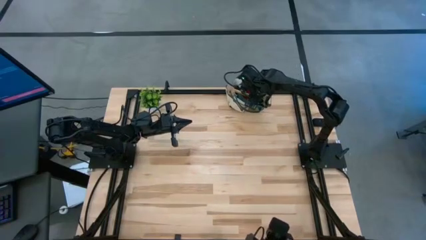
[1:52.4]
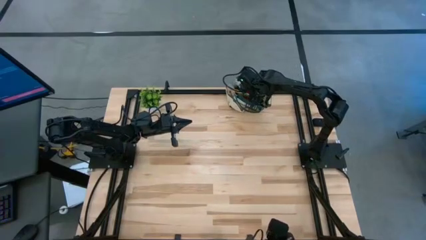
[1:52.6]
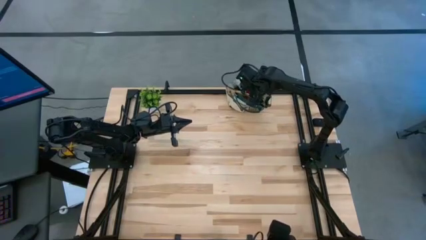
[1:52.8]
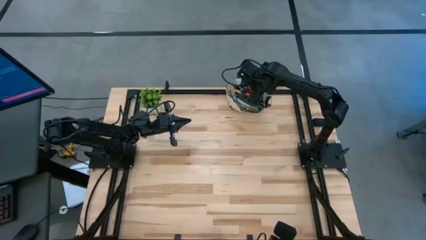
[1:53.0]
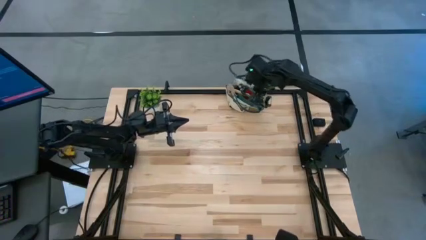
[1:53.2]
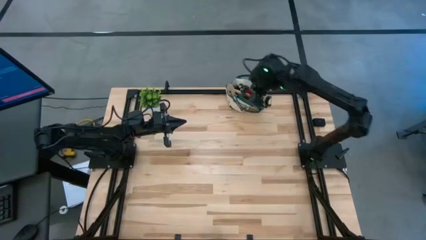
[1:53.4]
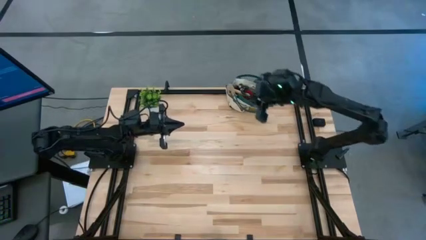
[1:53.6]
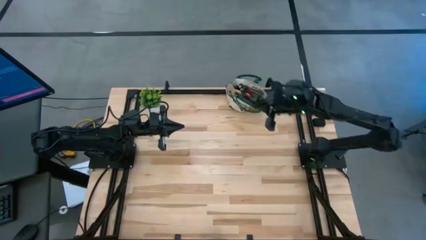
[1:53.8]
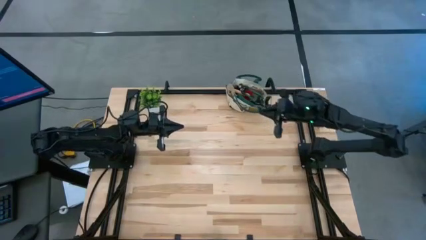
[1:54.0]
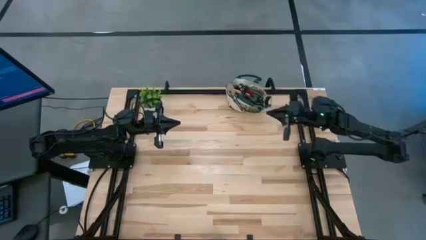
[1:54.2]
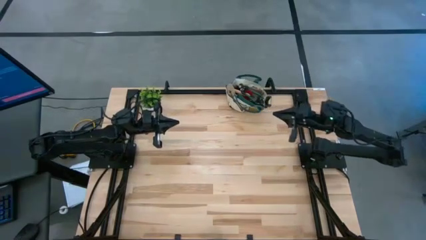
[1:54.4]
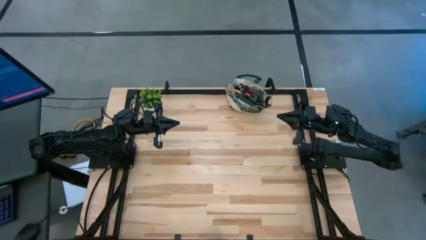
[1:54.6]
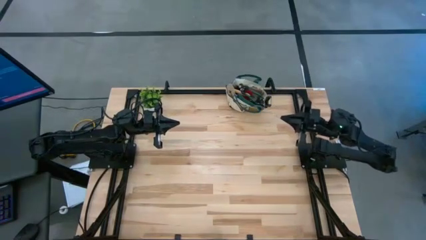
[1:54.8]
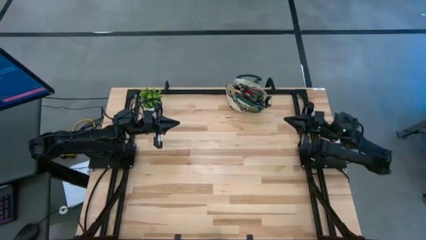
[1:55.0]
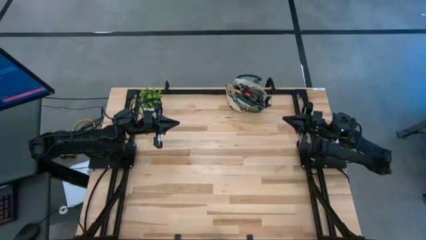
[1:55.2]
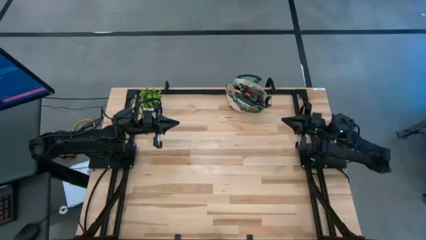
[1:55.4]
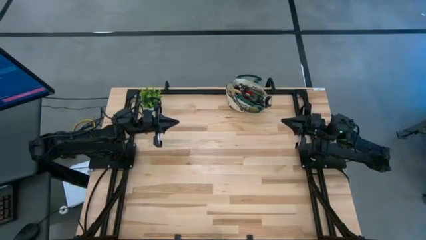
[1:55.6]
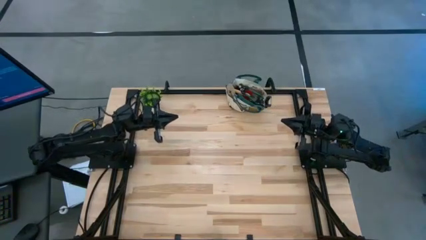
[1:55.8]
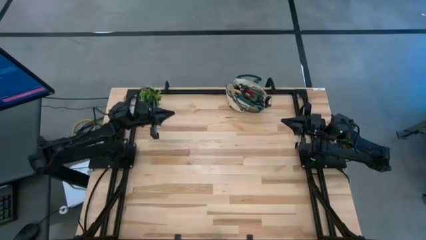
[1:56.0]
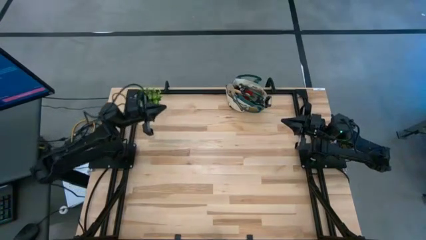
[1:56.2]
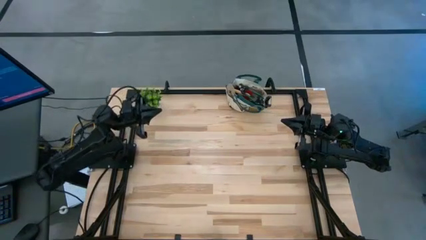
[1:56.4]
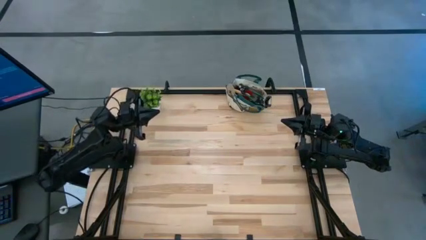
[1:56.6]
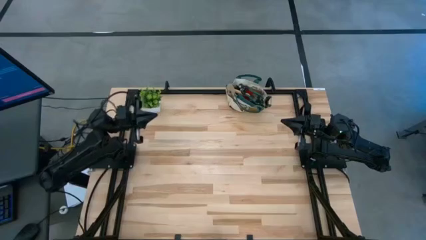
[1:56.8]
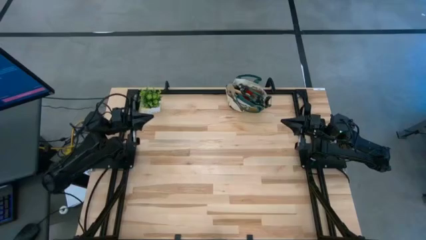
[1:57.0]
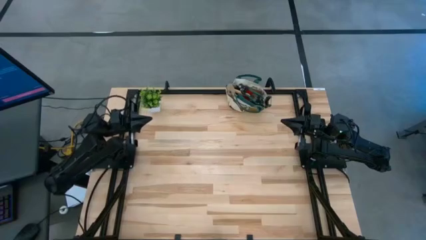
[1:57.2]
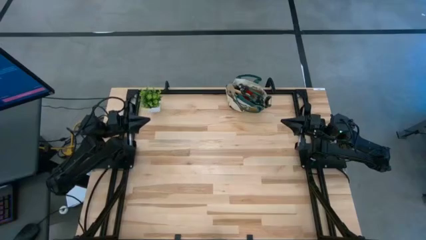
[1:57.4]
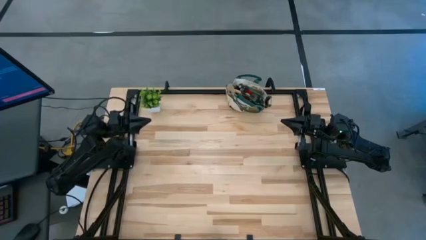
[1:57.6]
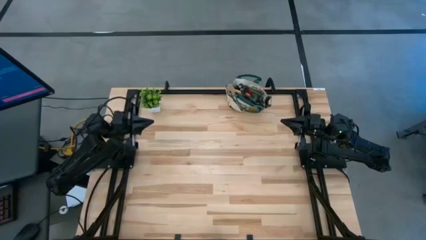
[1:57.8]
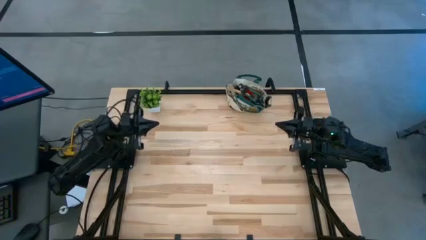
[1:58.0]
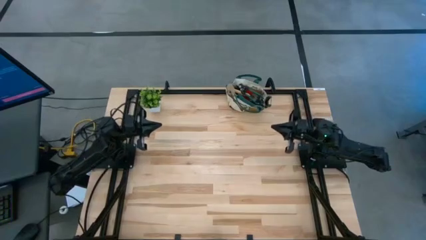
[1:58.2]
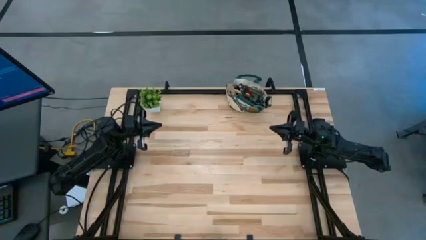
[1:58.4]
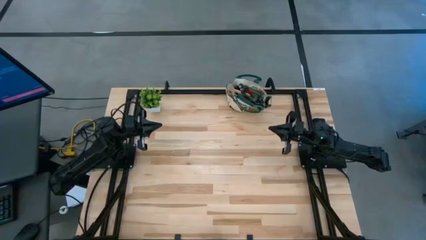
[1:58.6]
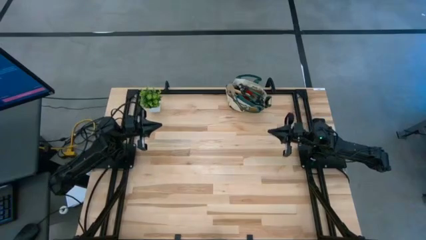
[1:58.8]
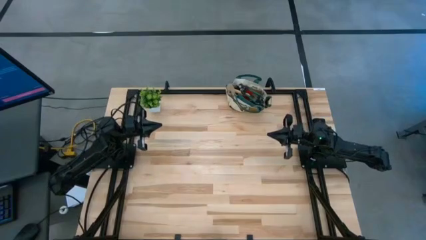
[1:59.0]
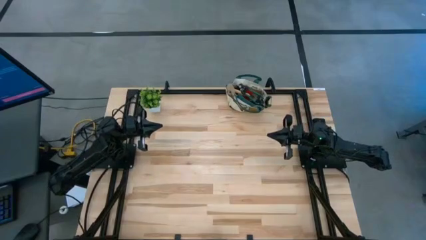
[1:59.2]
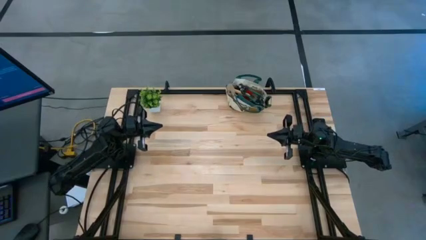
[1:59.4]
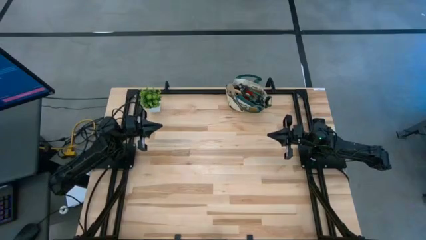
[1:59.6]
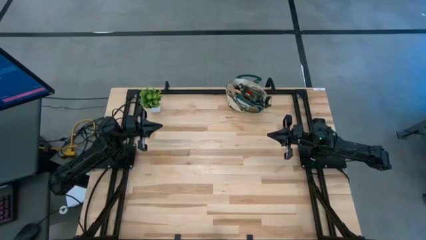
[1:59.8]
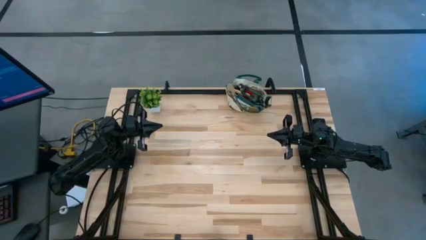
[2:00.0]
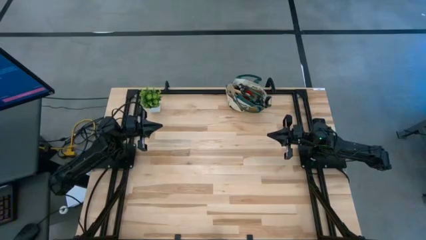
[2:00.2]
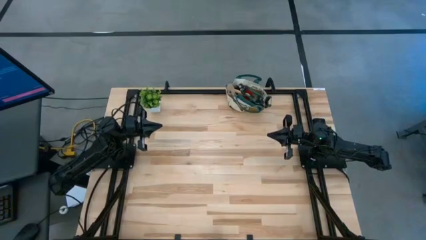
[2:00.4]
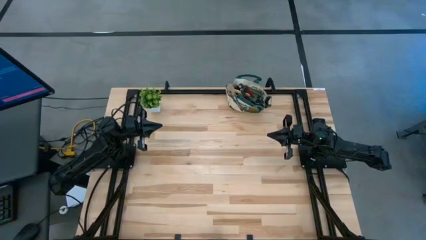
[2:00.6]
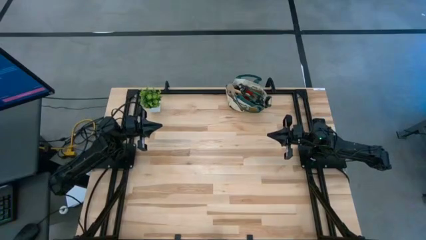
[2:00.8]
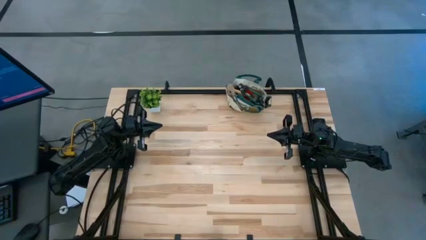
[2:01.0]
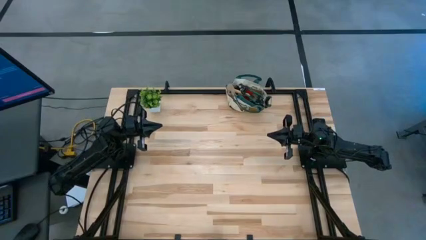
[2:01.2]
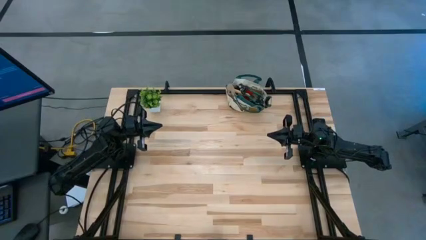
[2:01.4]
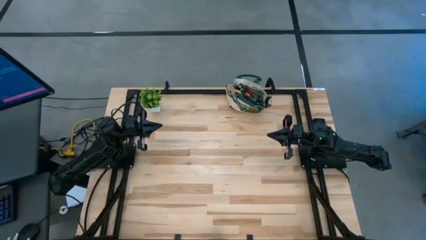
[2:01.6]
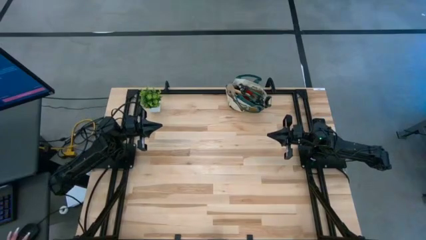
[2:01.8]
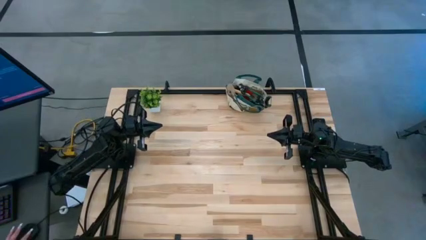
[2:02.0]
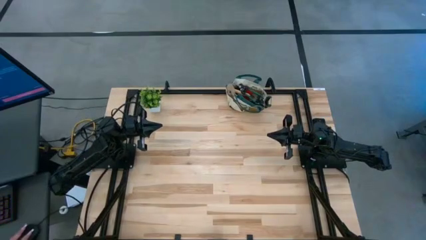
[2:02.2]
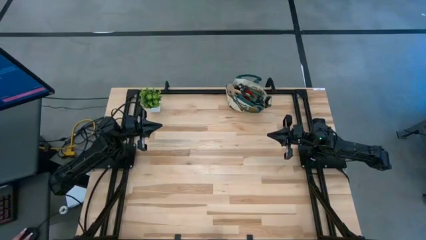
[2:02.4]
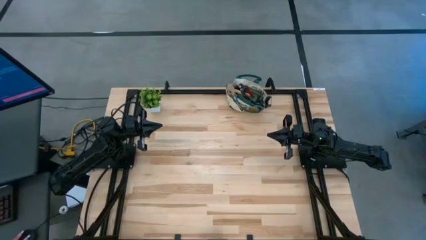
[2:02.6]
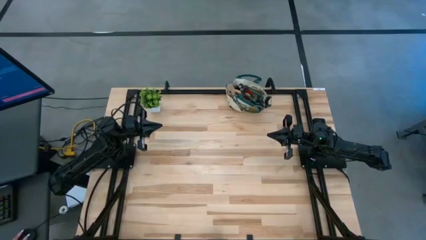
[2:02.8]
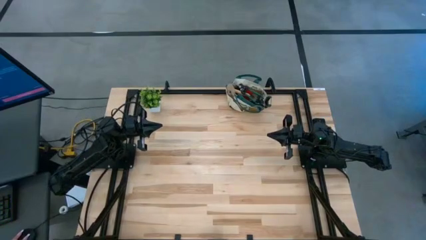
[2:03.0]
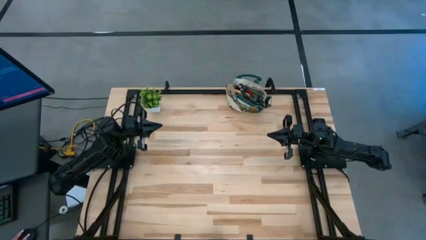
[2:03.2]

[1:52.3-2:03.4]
Task: Pick & Place Garden tools in Gardening bag
Return to Home Position

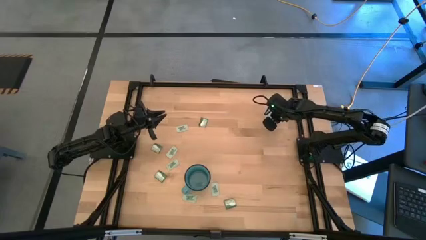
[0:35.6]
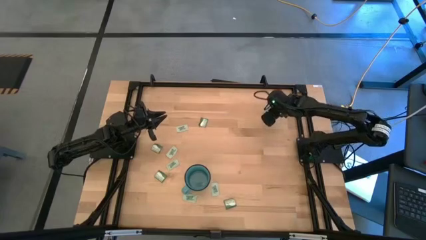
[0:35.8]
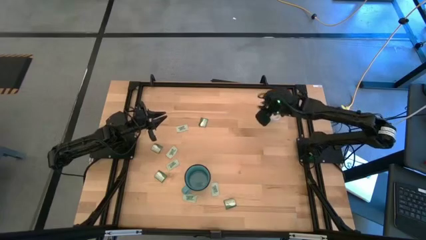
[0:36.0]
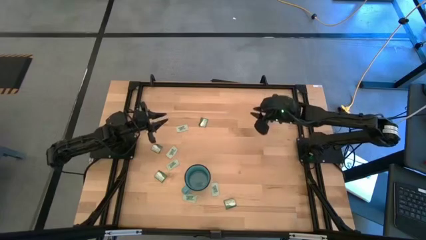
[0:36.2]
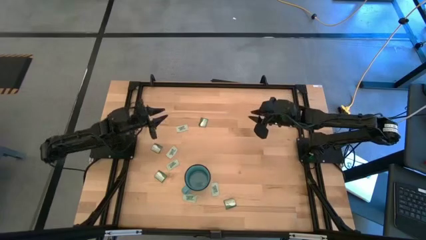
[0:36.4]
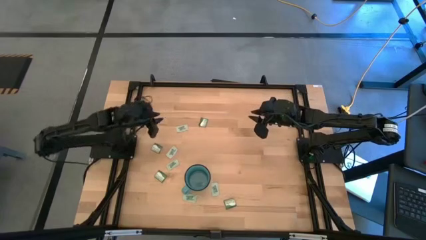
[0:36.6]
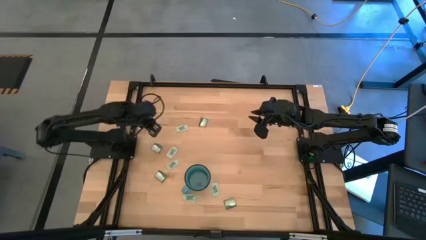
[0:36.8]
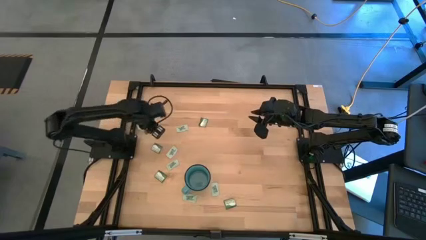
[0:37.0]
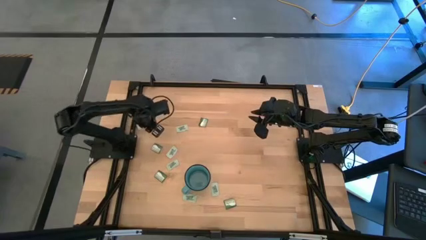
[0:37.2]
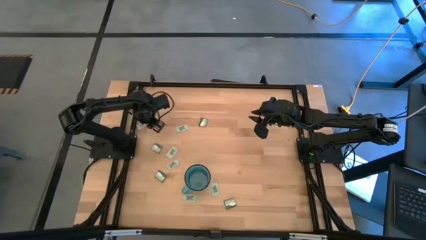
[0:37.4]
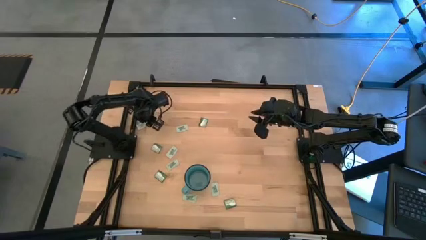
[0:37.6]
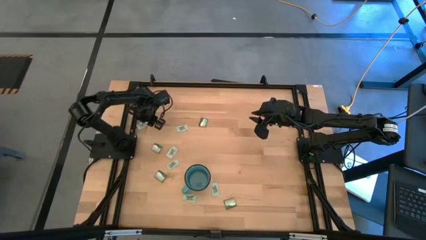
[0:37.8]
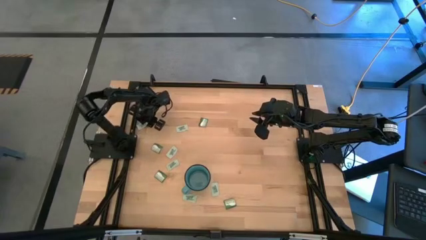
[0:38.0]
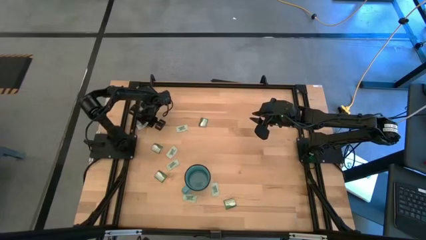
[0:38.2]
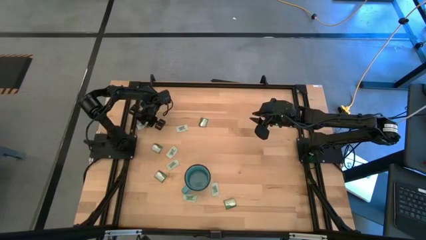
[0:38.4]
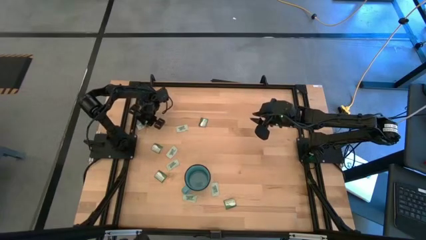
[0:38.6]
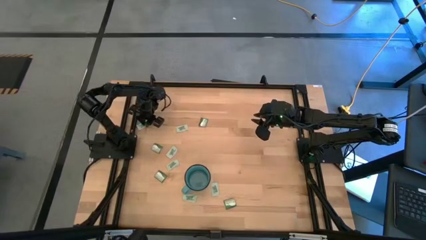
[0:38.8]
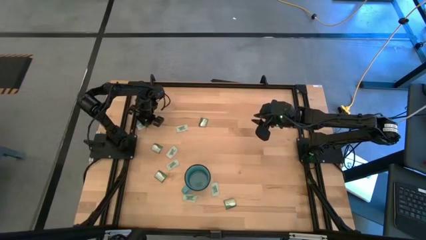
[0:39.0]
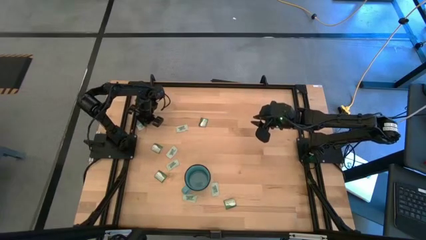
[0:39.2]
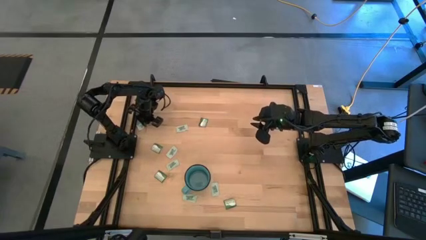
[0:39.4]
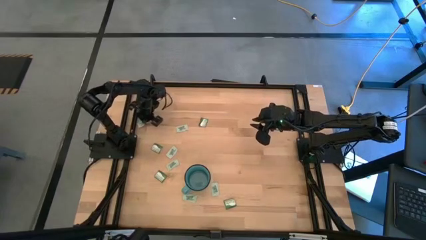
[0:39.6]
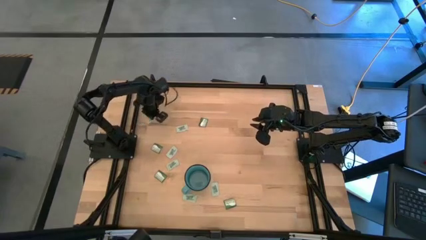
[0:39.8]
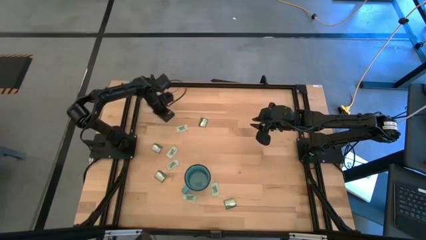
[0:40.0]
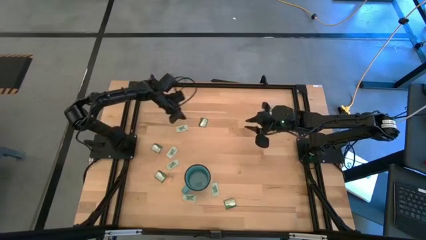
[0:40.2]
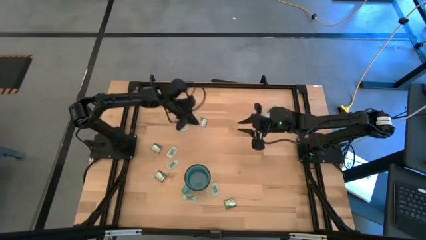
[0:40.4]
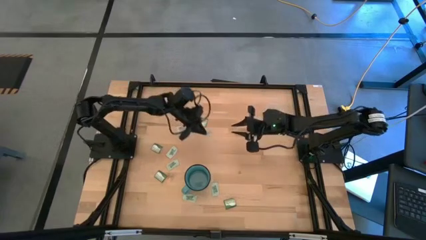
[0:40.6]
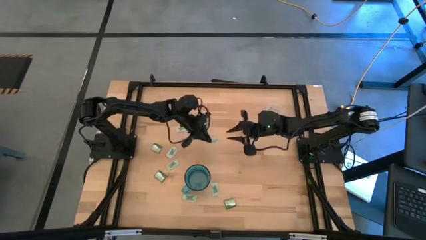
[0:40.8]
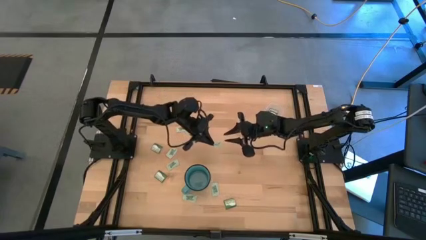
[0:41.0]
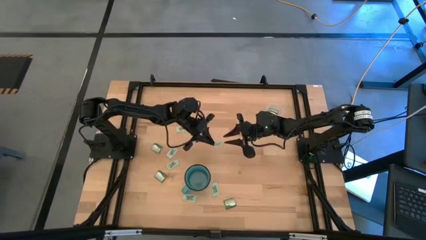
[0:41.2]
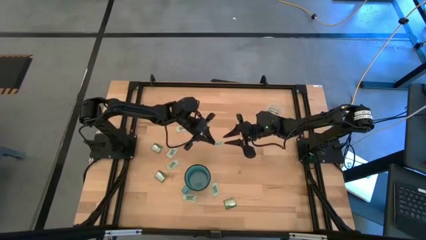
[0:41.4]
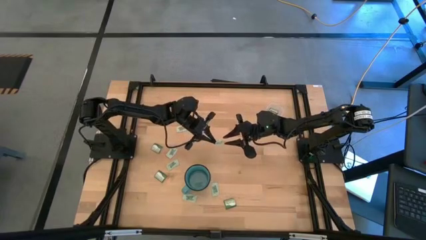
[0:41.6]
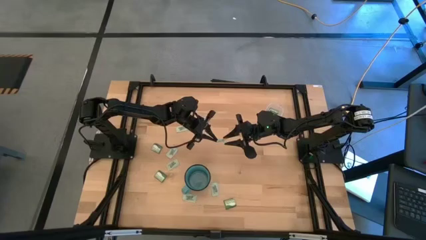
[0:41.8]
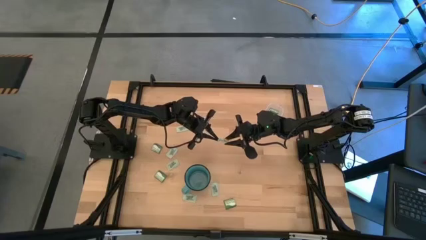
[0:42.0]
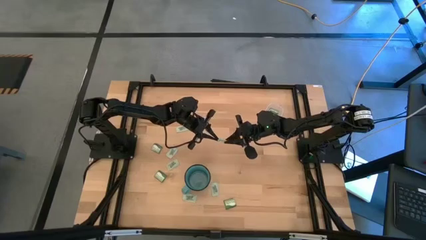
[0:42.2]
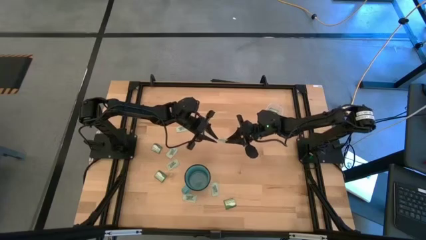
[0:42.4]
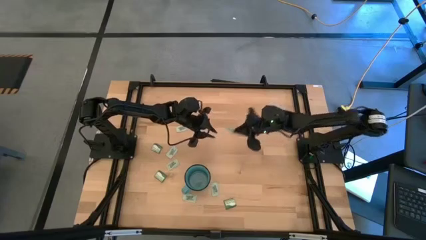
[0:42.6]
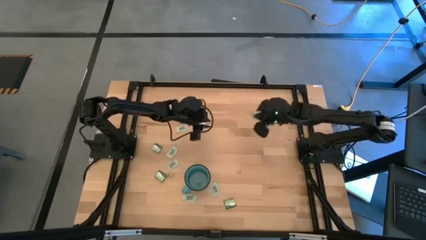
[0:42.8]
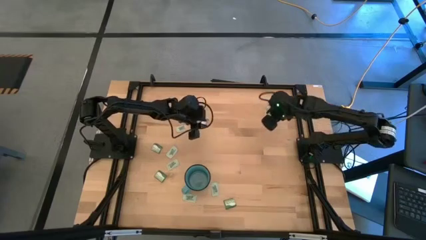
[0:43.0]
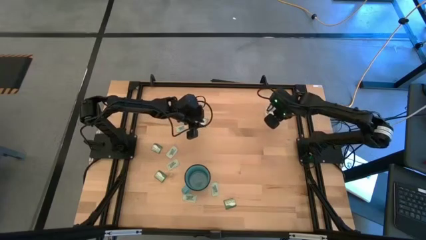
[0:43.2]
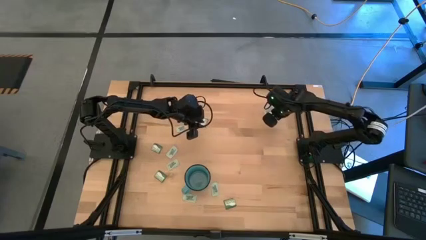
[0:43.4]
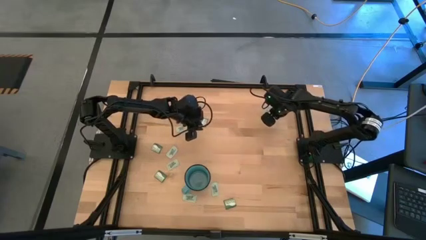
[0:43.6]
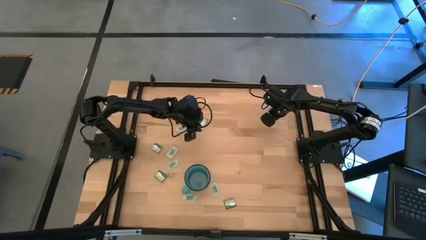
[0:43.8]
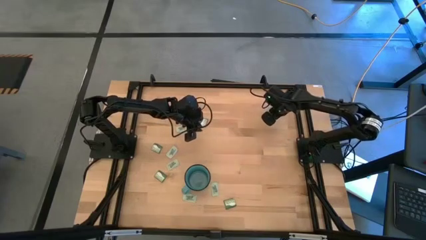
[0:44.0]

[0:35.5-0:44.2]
Task: Pick and place items into bin
Put the stevia packet into the transparent bin
